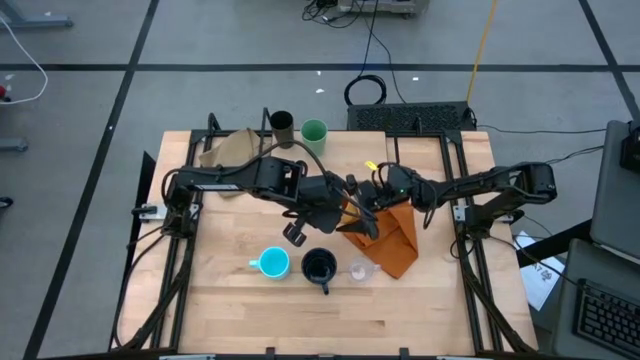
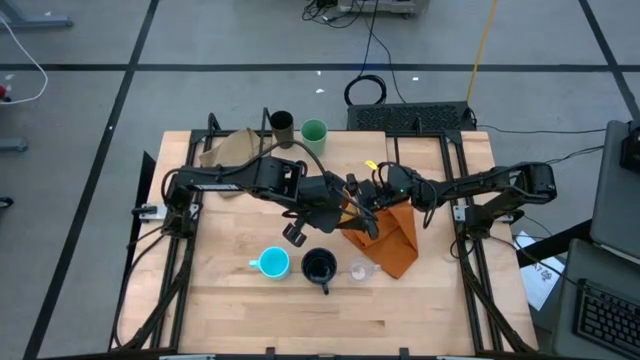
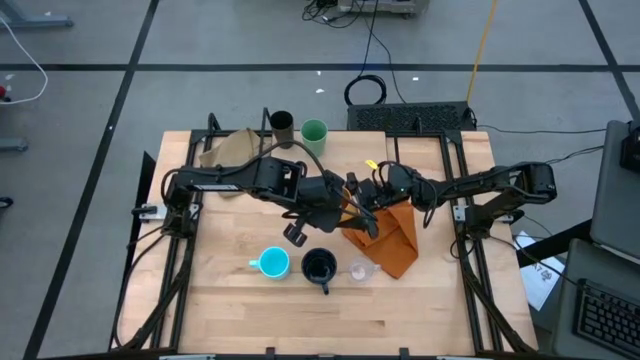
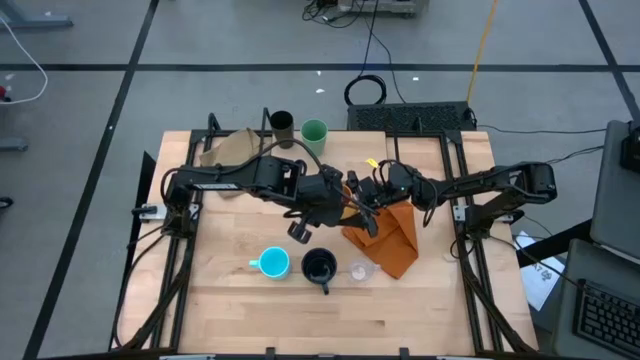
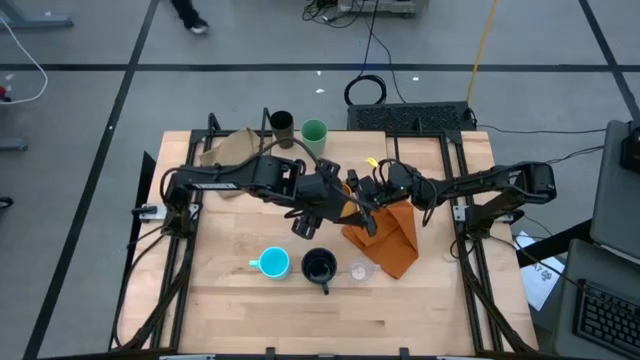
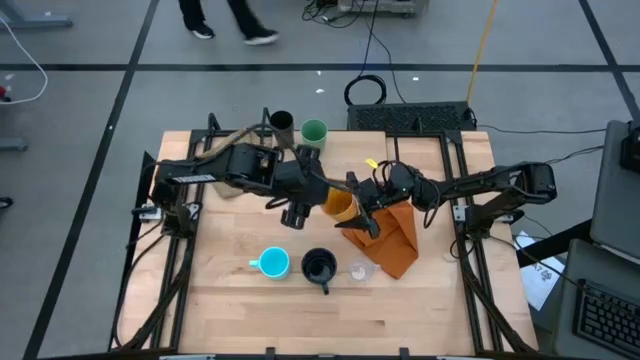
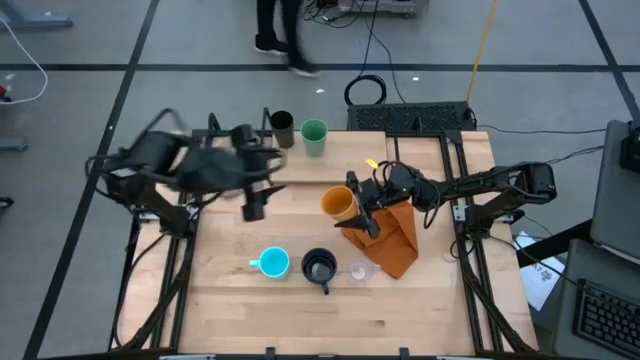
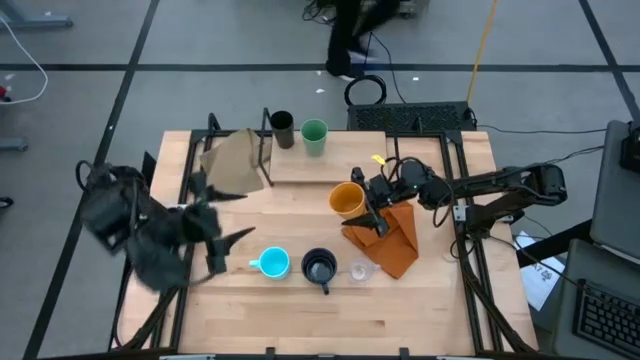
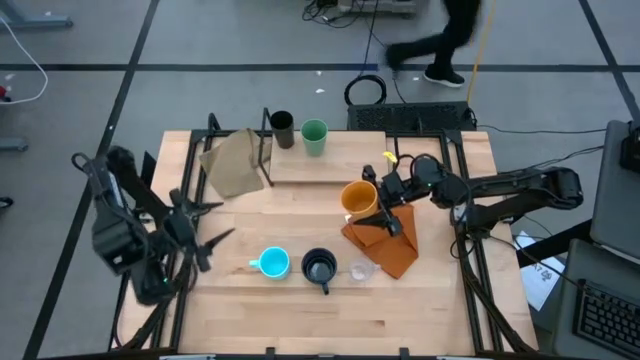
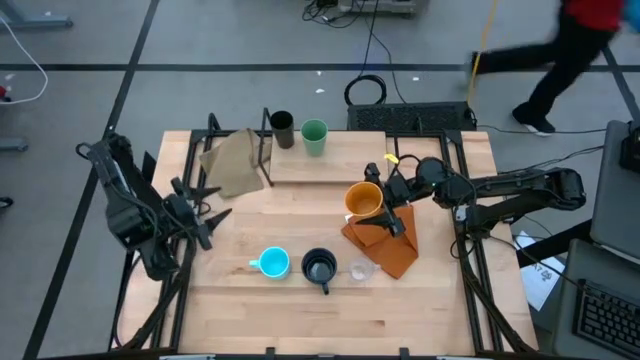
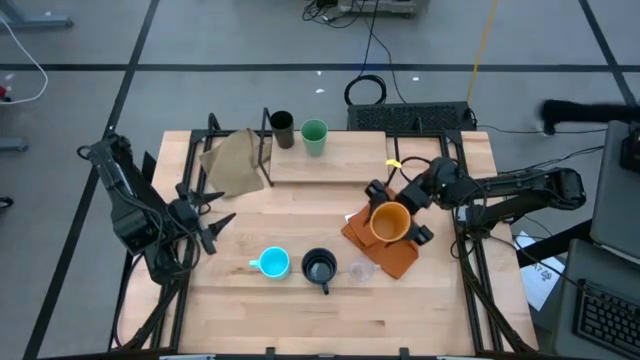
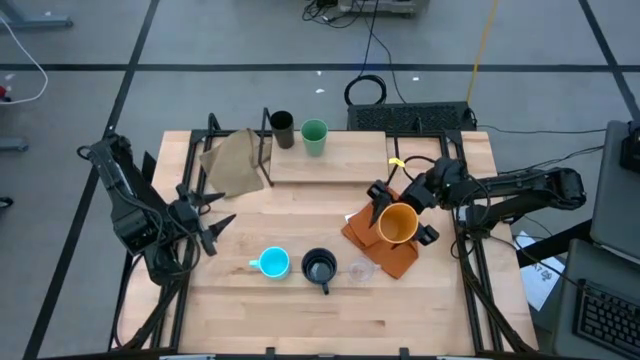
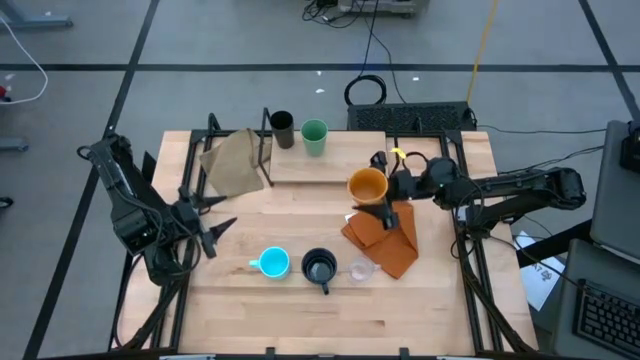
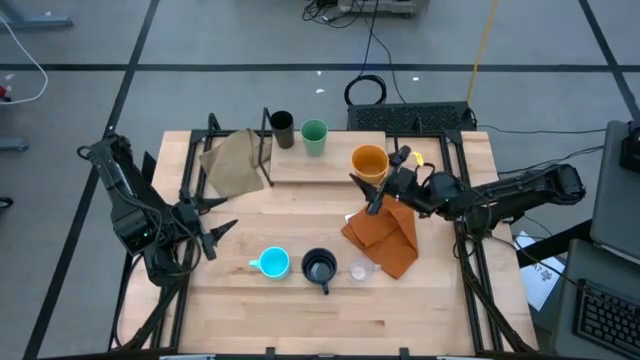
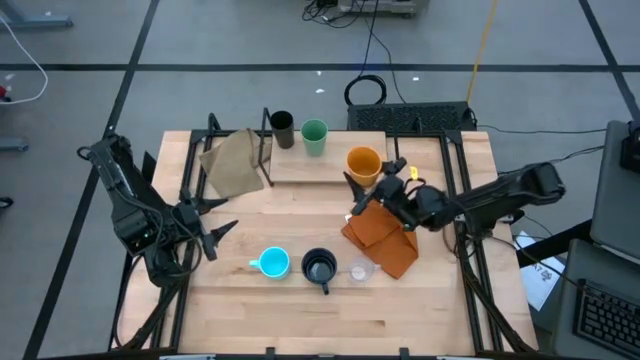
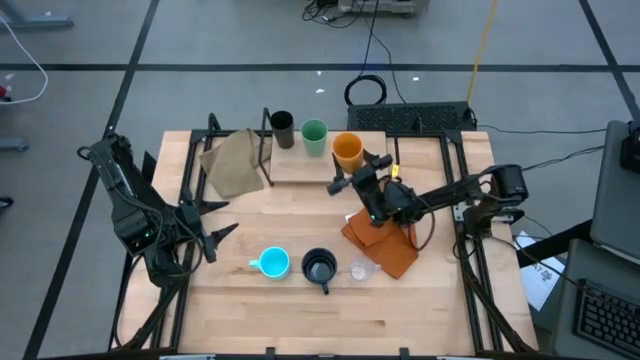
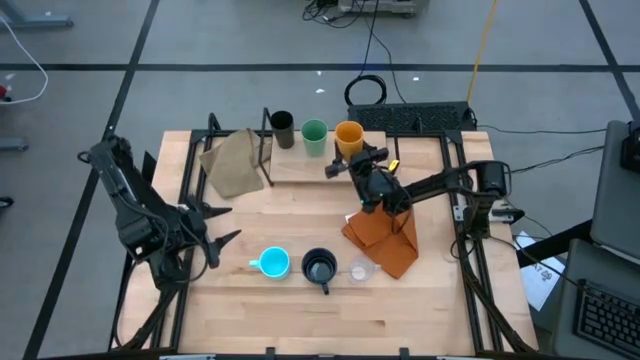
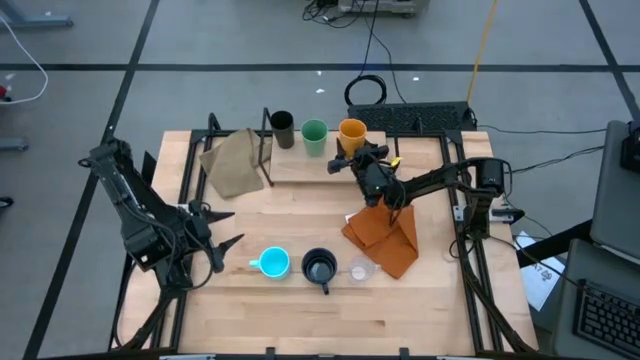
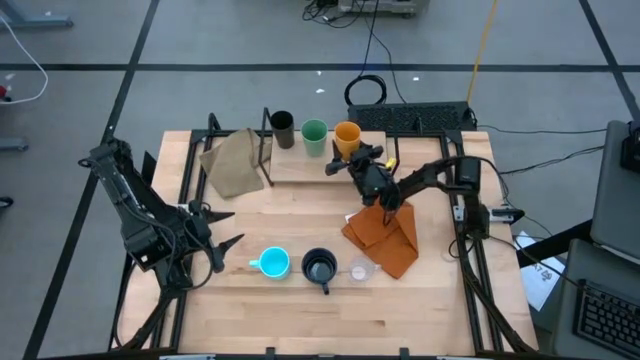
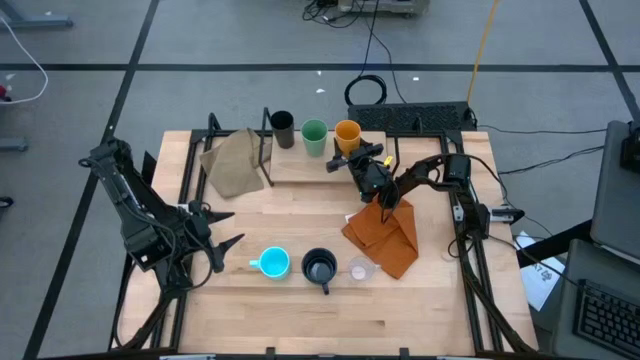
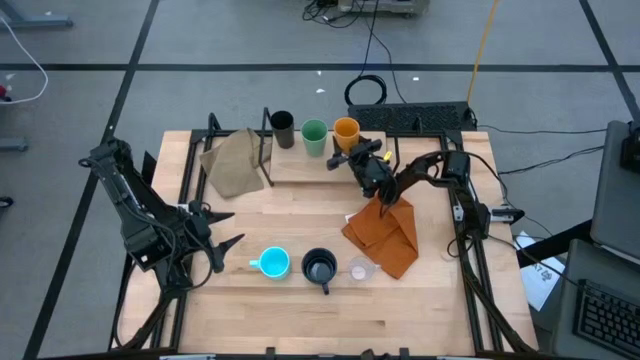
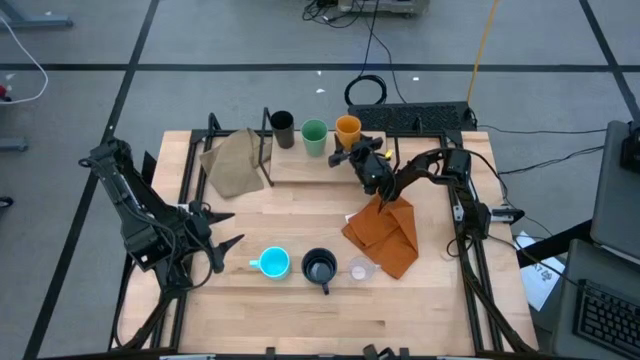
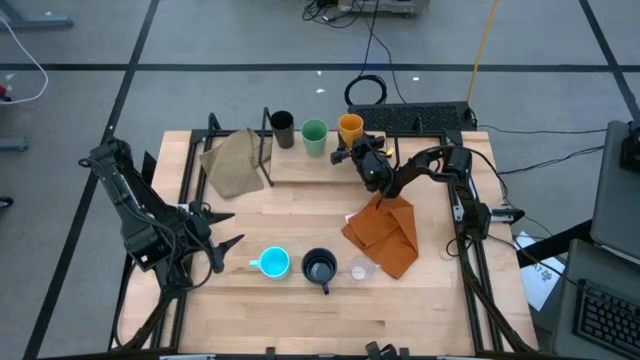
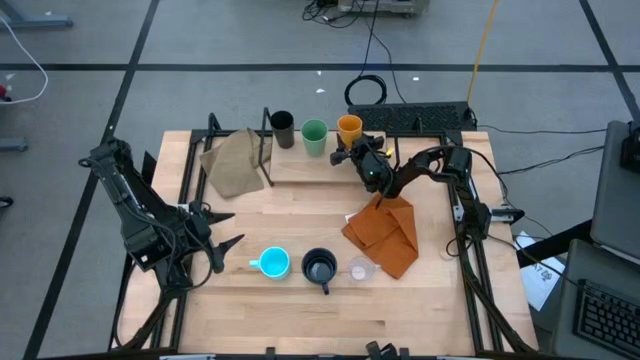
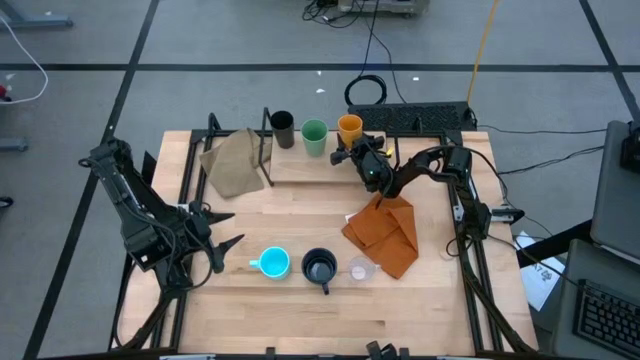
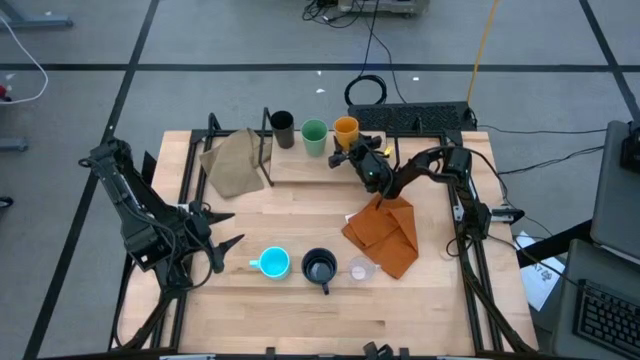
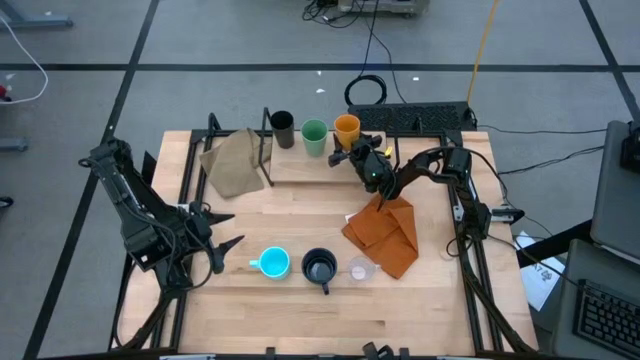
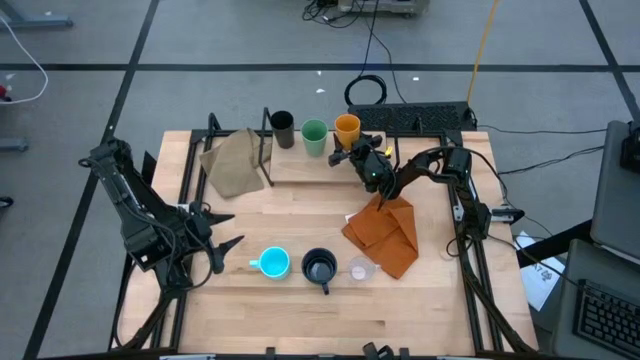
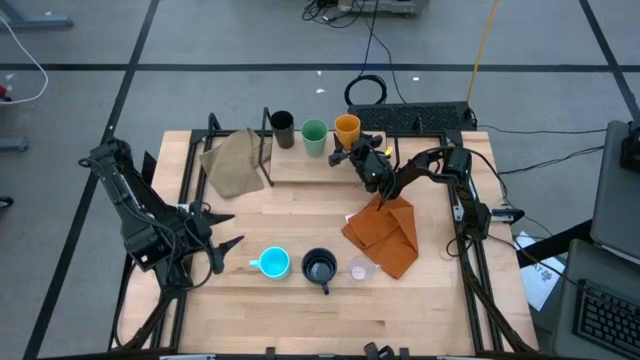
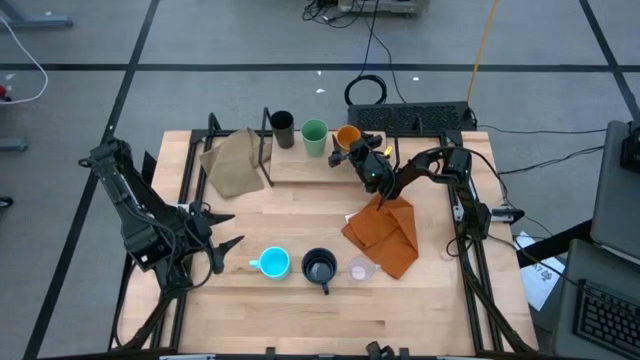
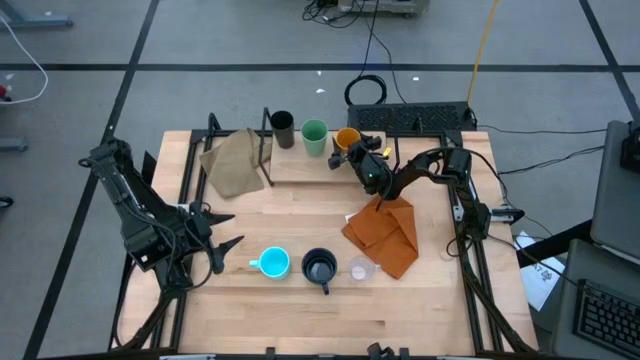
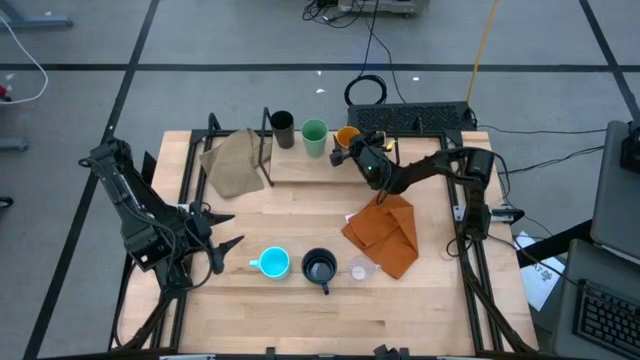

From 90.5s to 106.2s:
Task: Stack small to large cups/mugs on shelf
Put the orange cup on the shelf

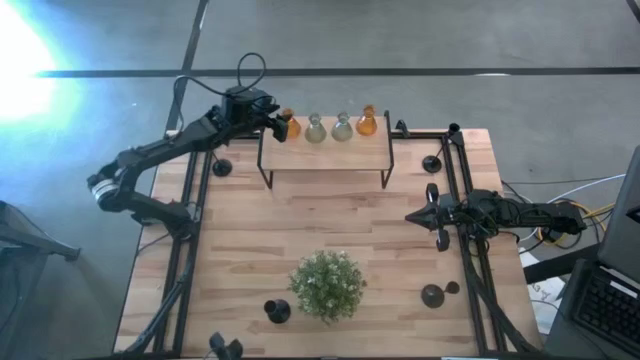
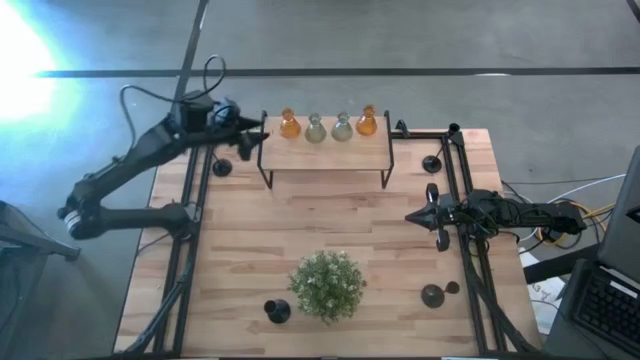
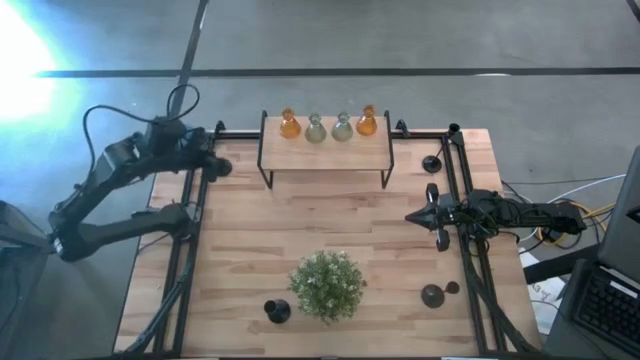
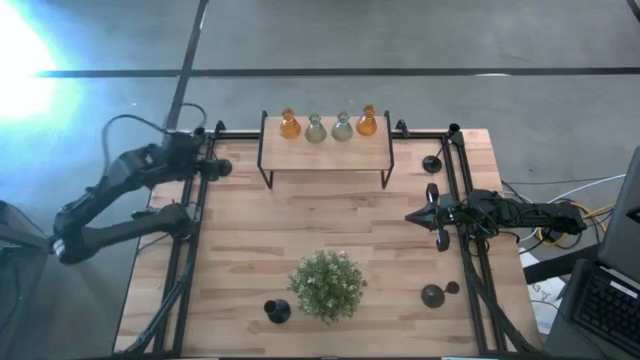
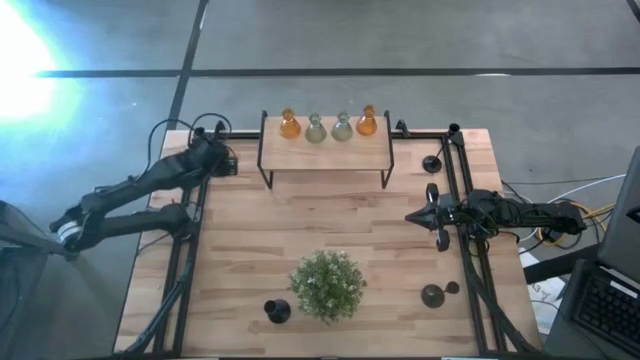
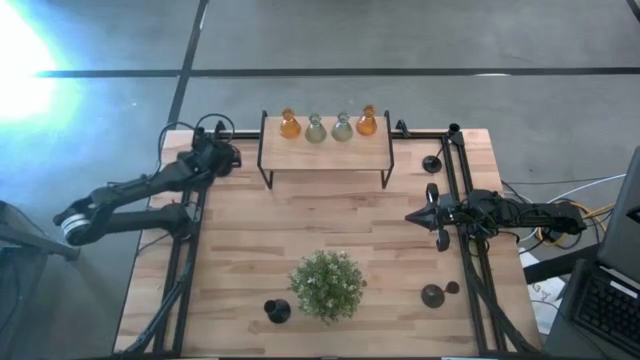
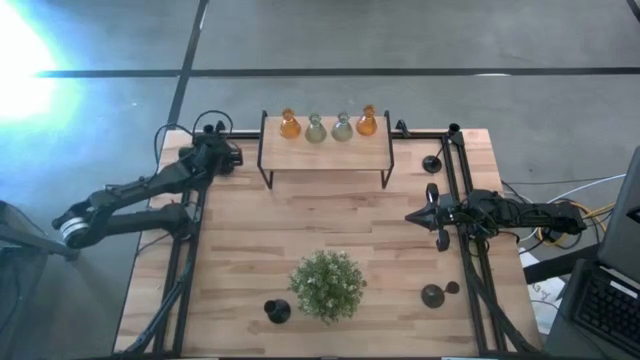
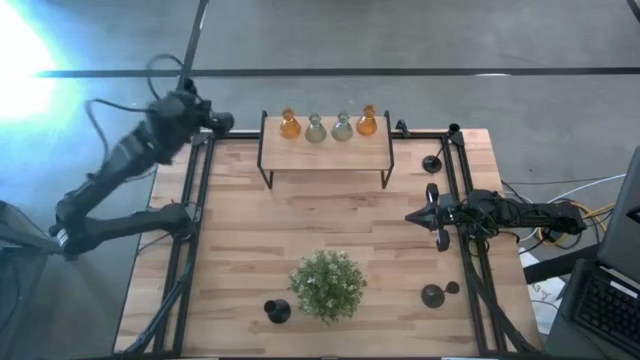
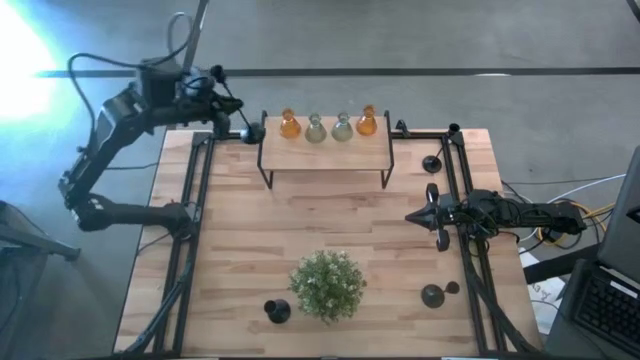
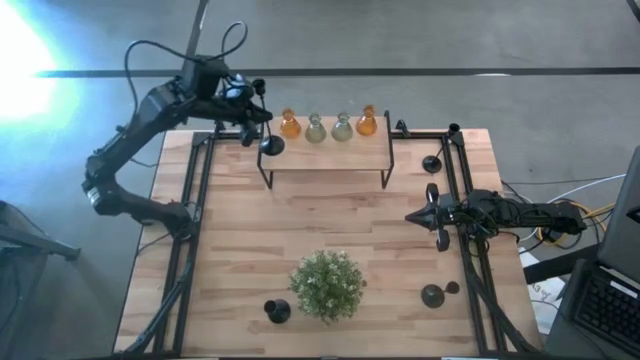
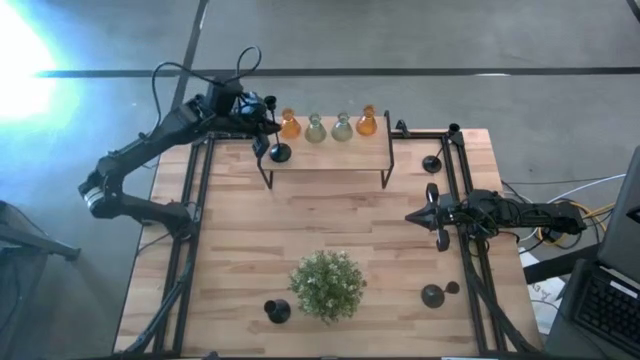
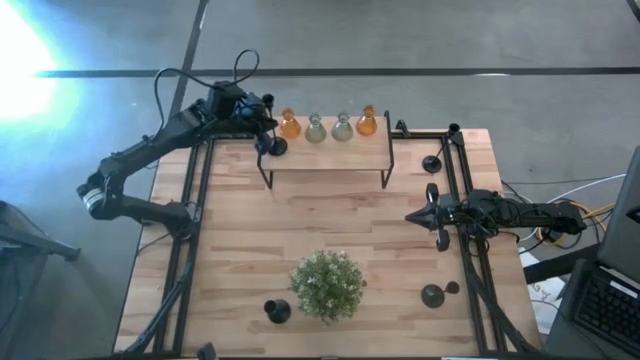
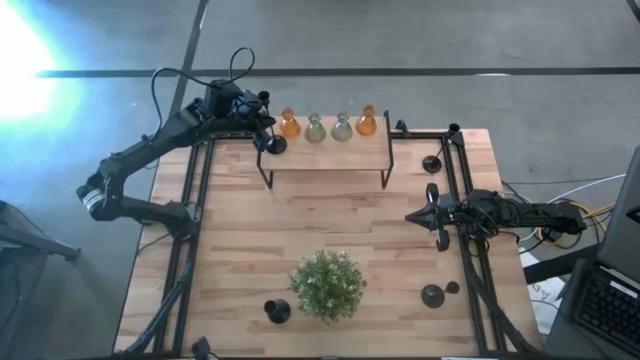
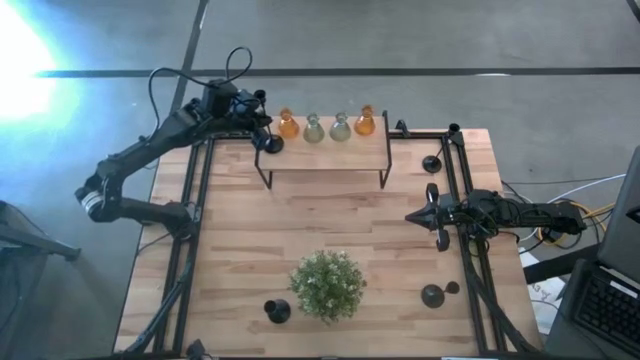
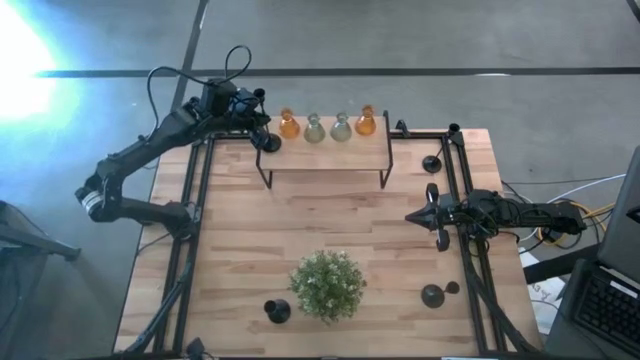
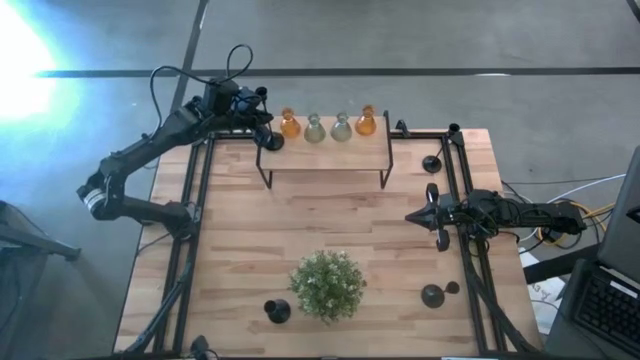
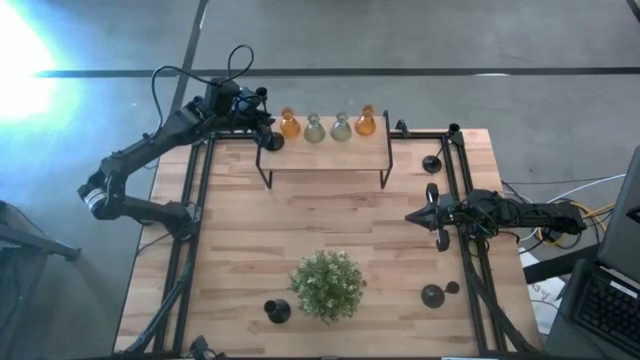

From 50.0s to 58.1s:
Task: Pick & Place candle stick holders
Put the black candle holder on the shelf
